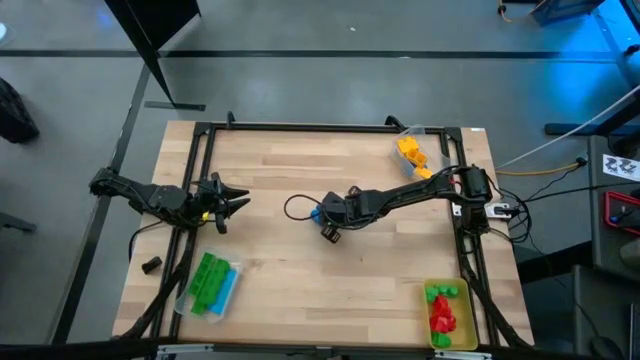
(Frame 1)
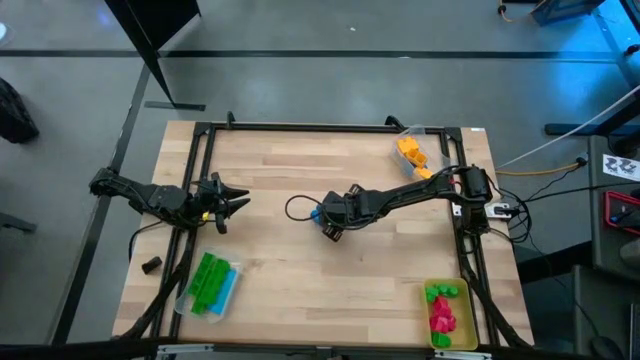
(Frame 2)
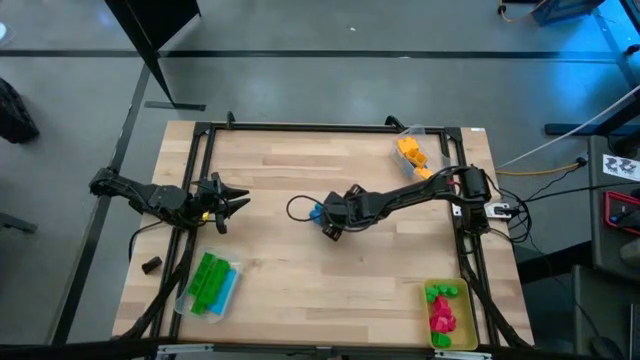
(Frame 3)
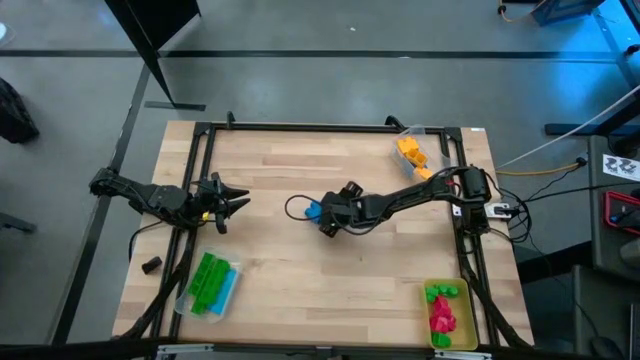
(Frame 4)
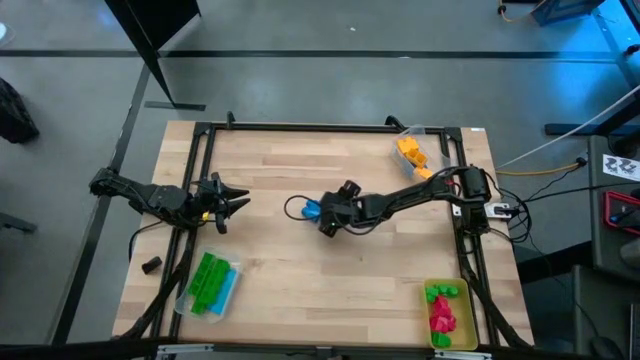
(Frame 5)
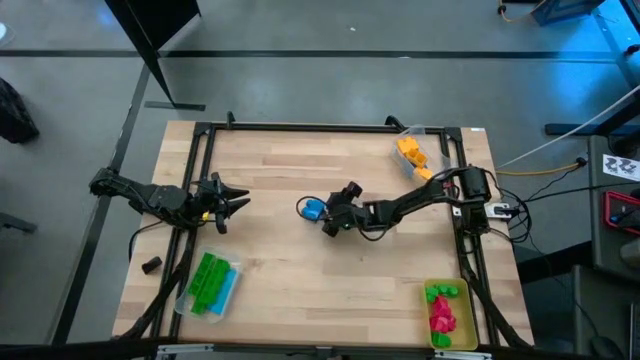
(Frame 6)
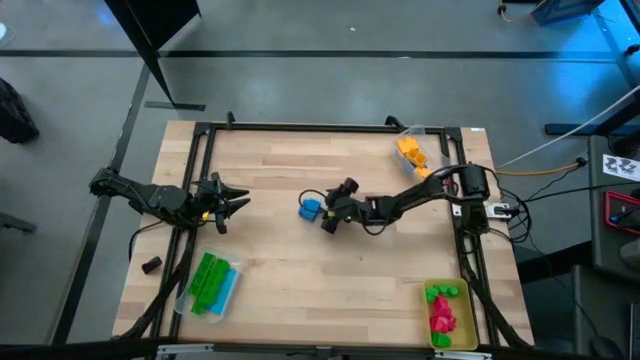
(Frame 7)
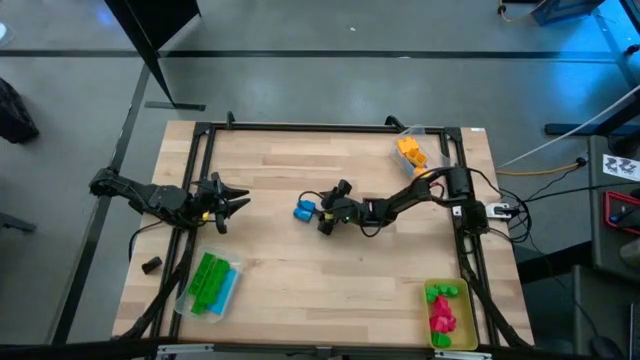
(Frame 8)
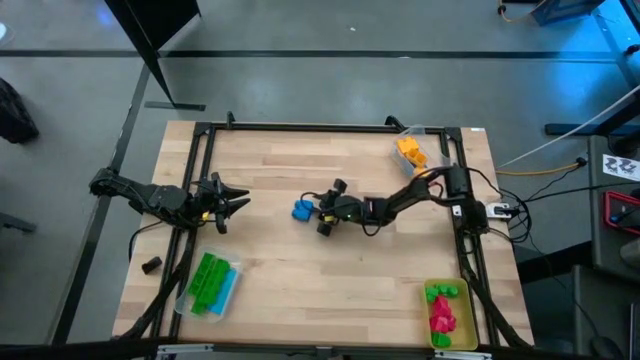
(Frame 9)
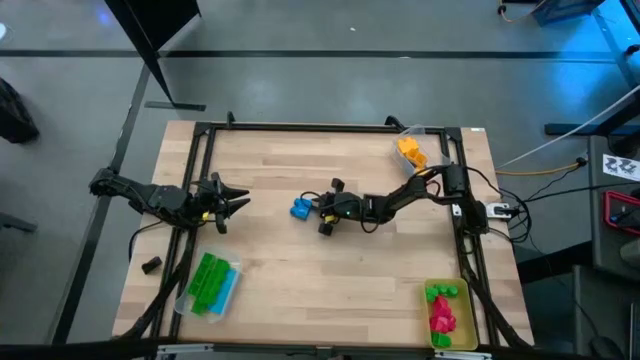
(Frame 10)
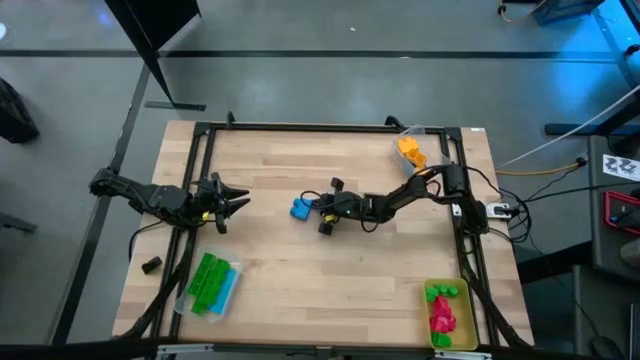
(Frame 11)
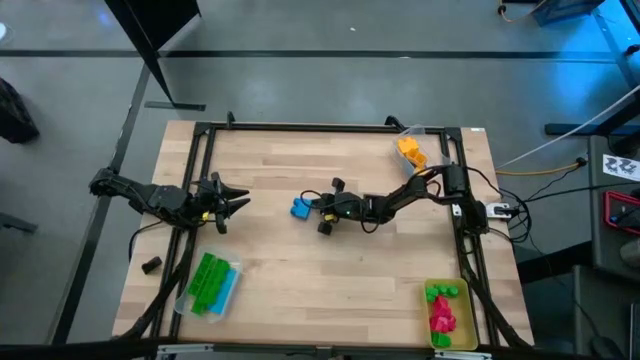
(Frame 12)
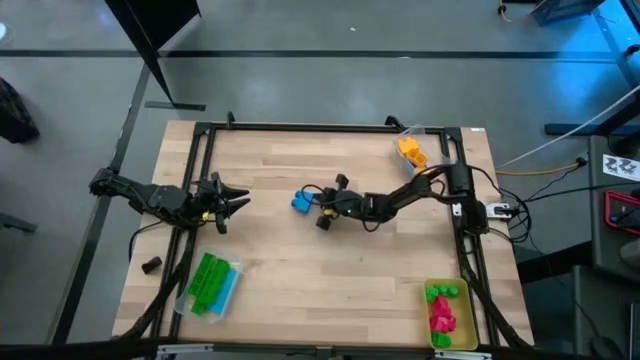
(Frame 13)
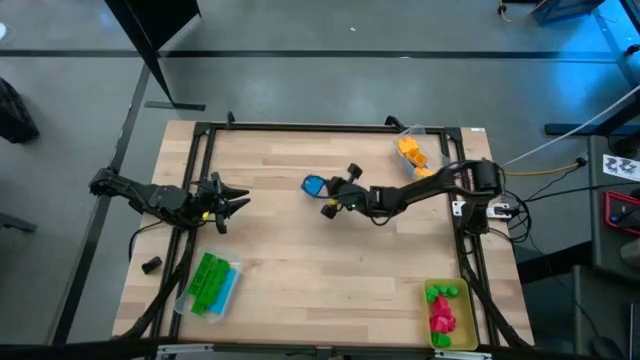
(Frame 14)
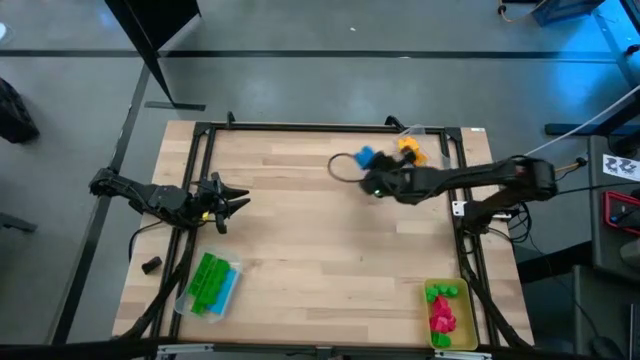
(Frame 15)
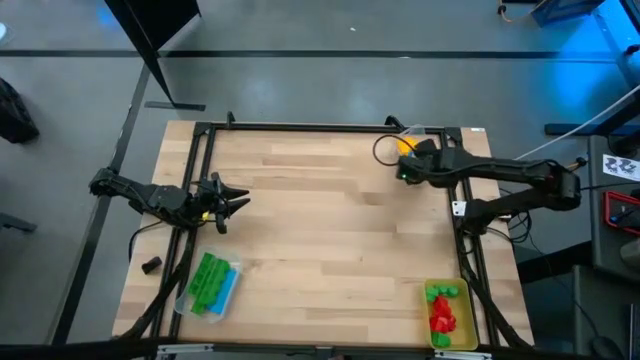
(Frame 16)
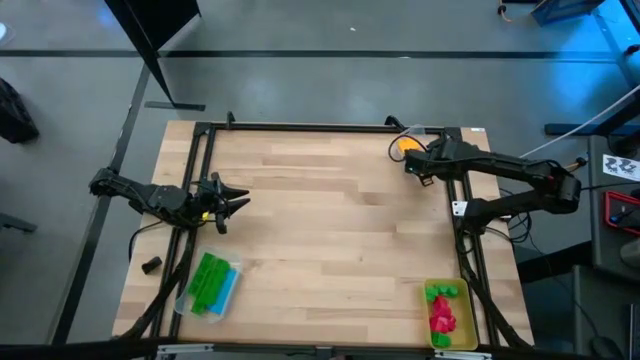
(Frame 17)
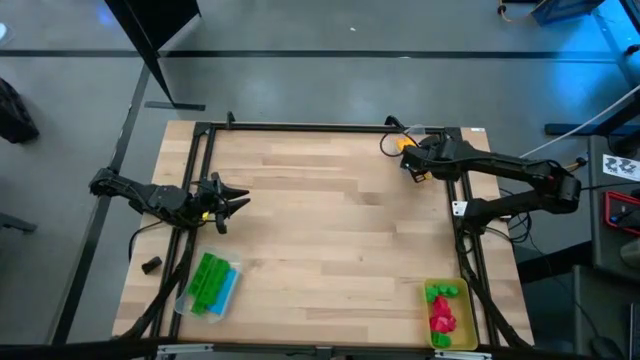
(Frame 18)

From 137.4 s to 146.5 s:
Task: Sort blocks by size
Put the 2 stud blue game piece into the top transparent bin

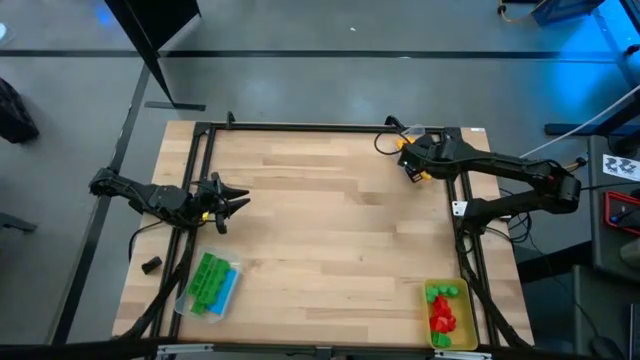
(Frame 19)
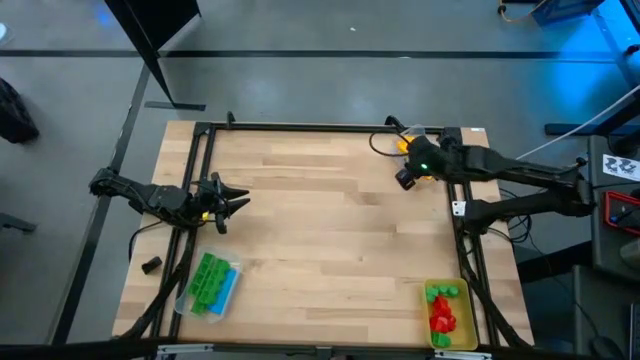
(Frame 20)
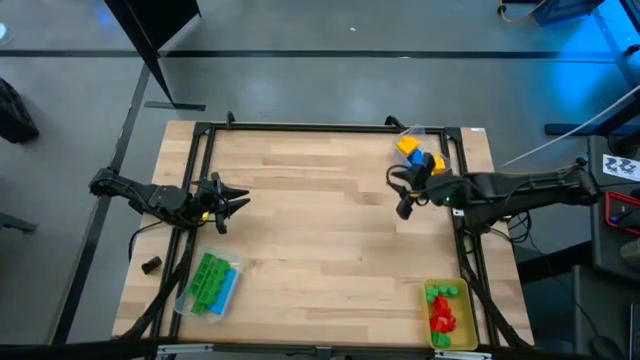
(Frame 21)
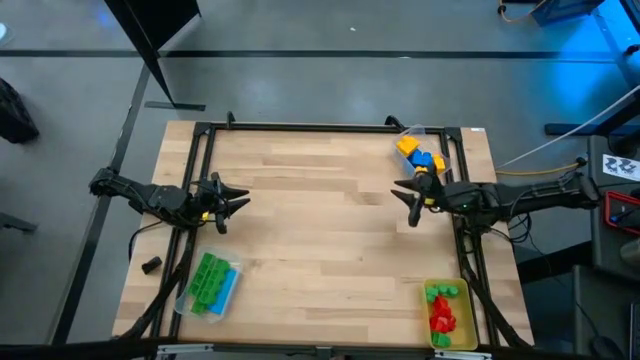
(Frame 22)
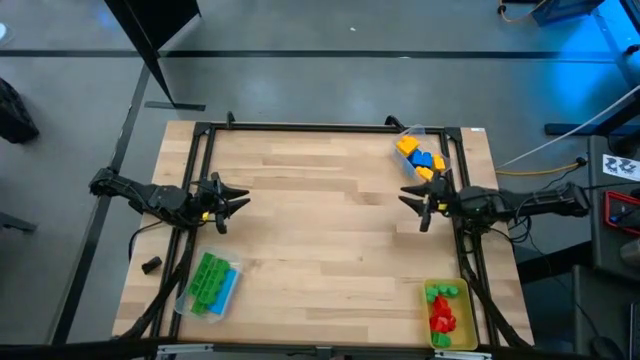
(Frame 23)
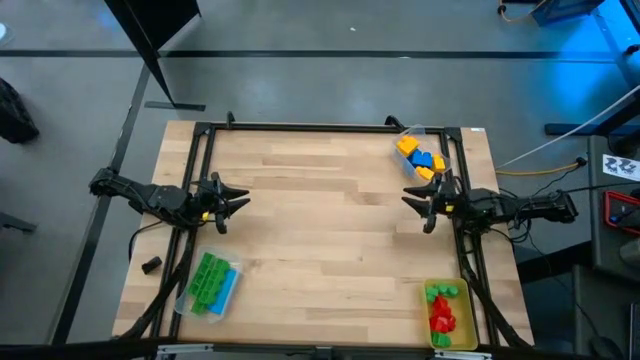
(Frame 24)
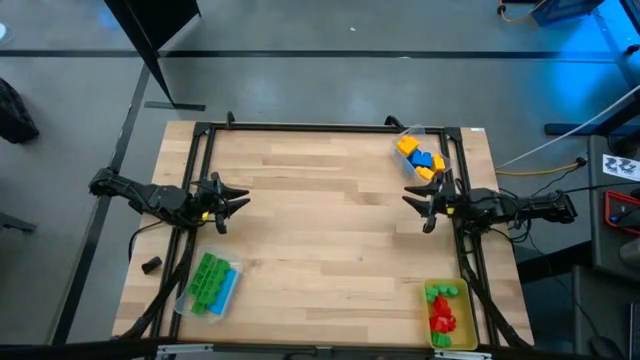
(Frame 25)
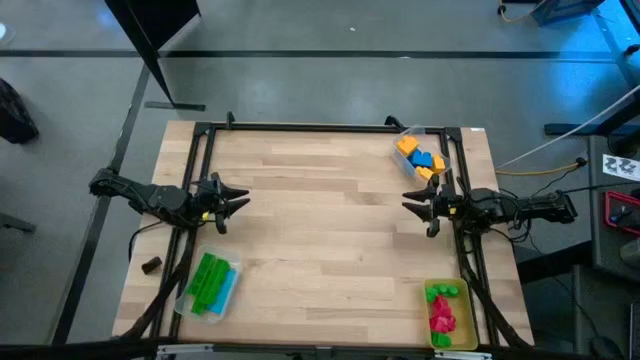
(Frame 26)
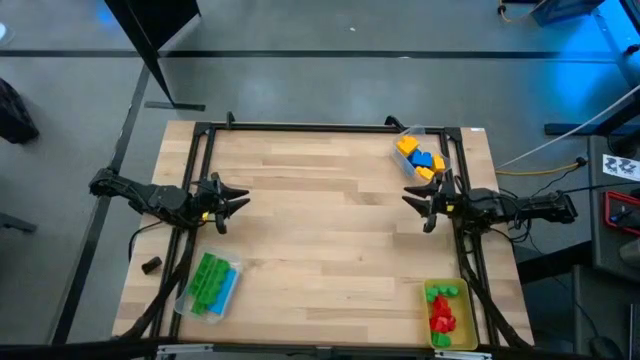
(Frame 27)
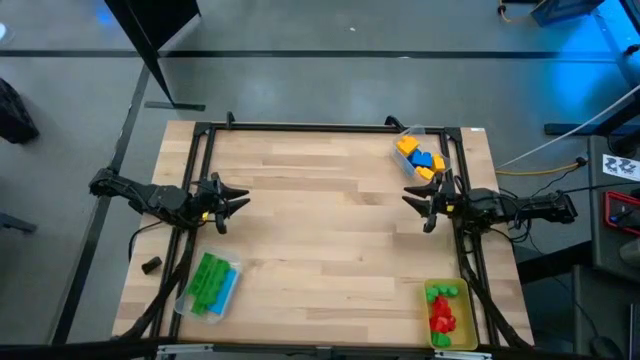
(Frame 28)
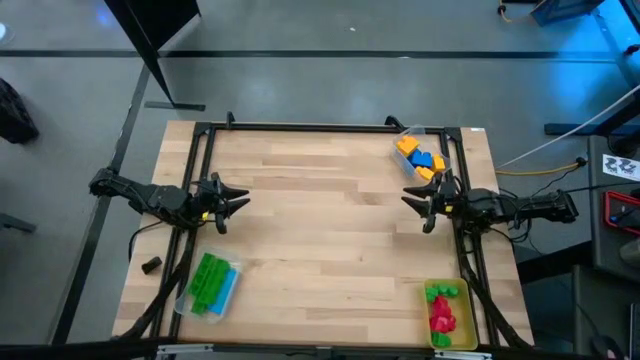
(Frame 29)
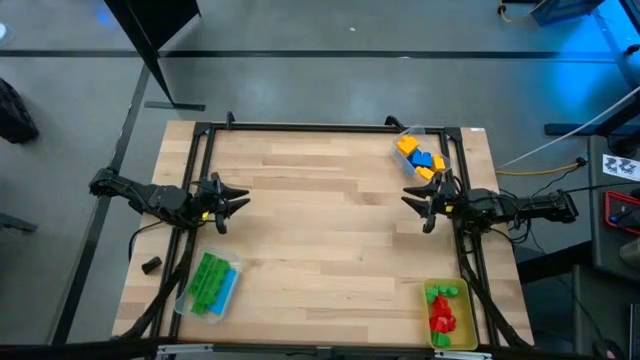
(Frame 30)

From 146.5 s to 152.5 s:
Return to Home Position

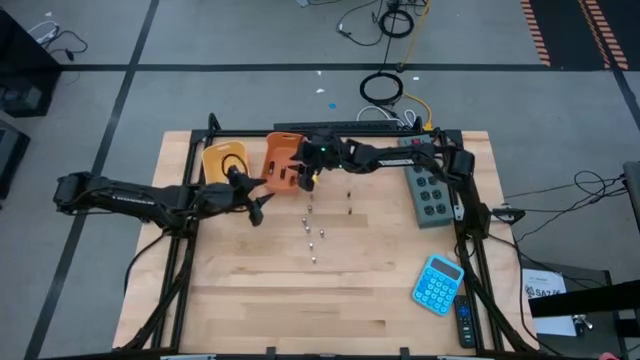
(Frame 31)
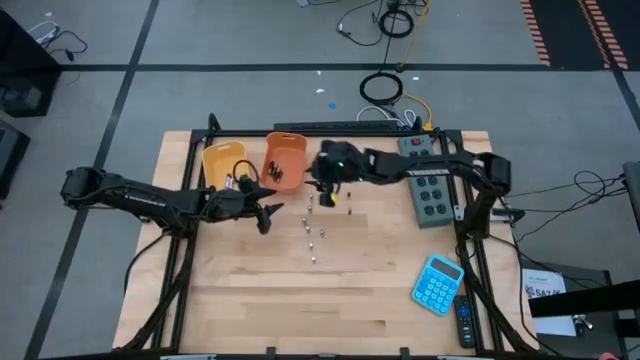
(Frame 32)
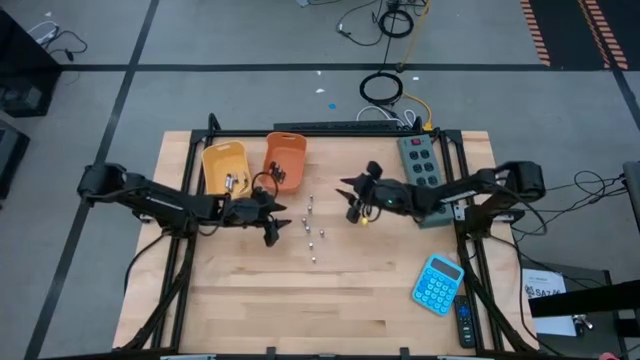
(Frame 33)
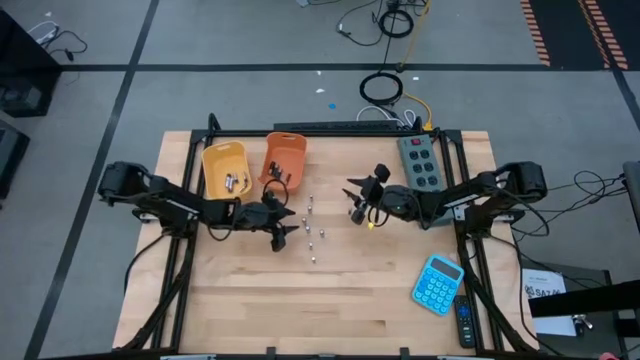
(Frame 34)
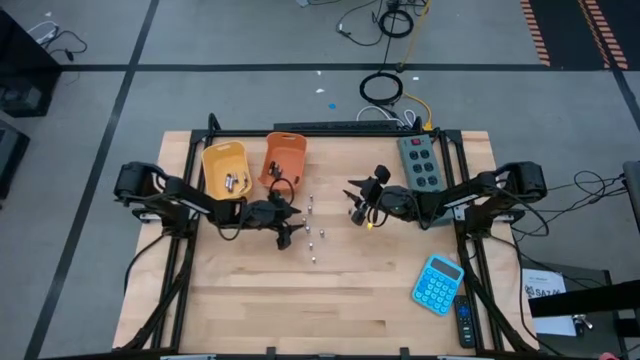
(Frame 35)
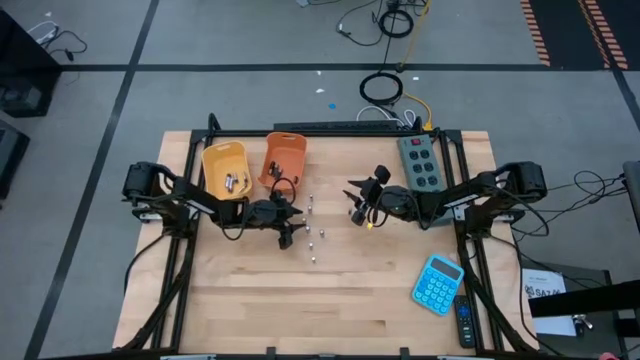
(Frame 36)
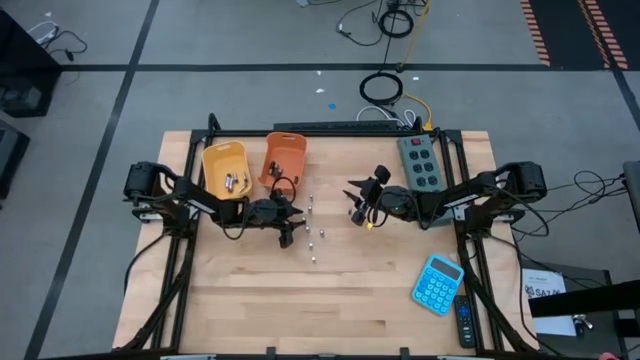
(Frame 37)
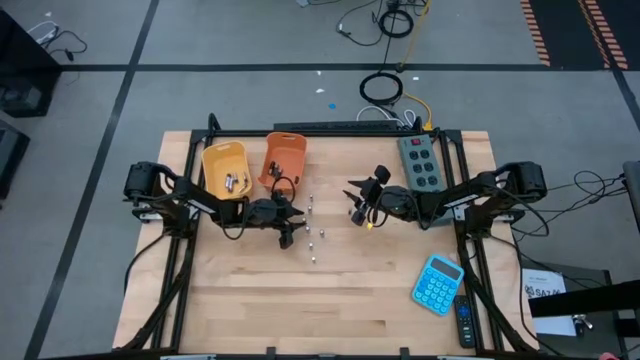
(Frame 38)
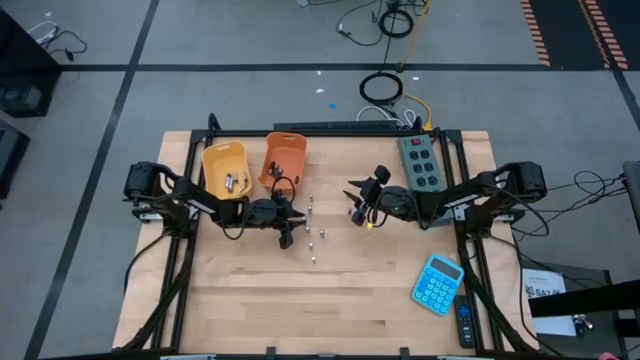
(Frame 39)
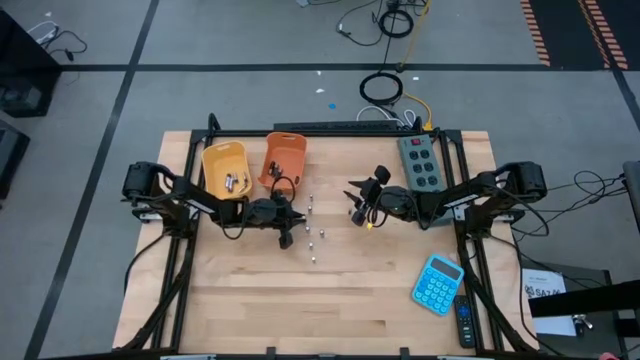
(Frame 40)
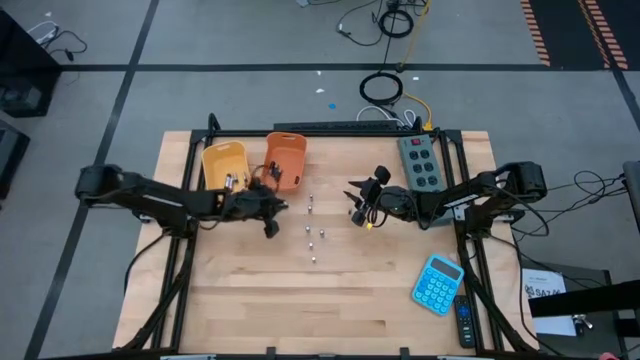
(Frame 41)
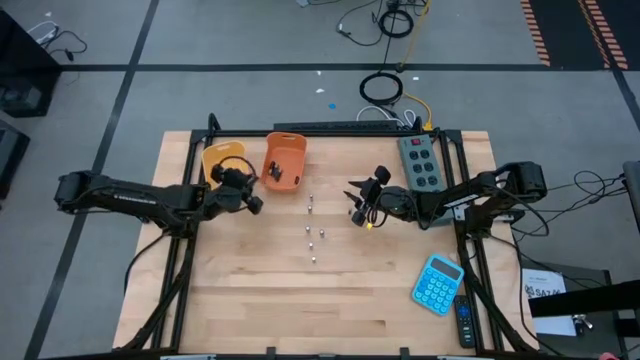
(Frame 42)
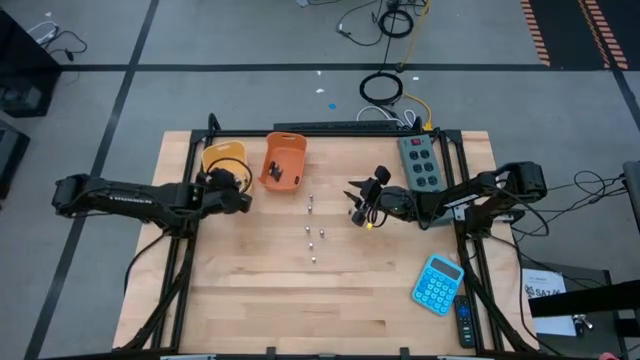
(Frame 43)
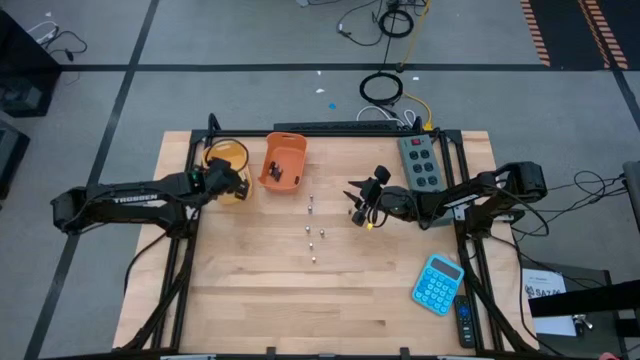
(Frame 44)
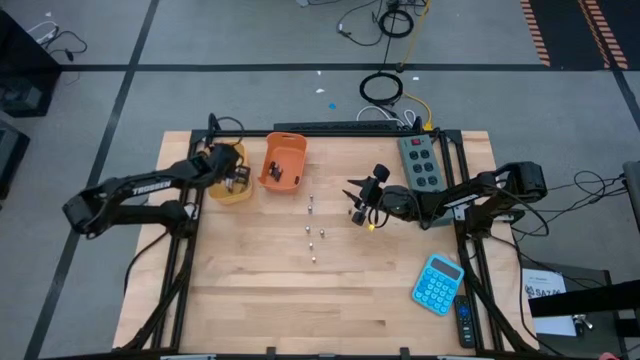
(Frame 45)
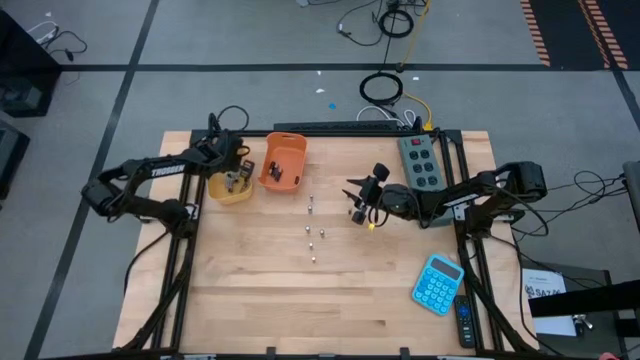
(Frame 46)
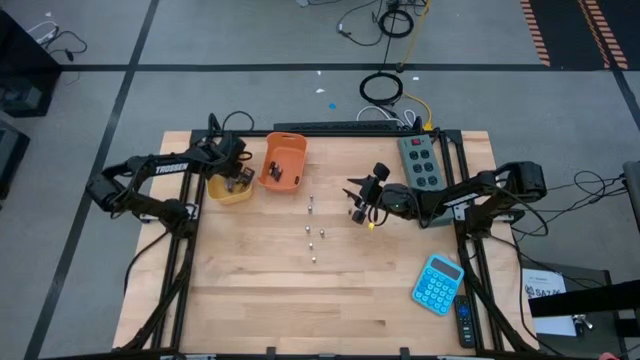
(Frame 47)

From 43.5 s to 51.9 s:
Task: Sort batteries
Put the silver battery into the yellow bin
